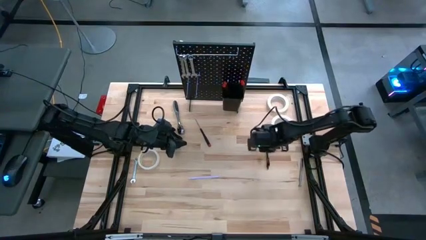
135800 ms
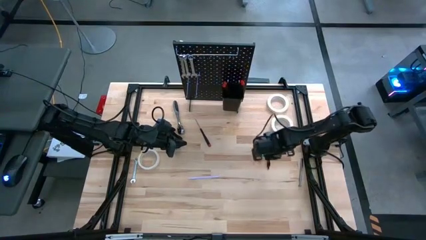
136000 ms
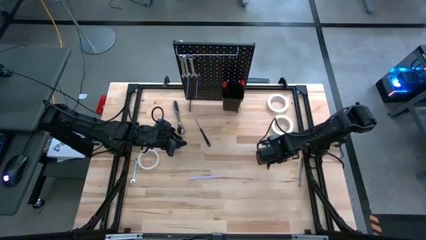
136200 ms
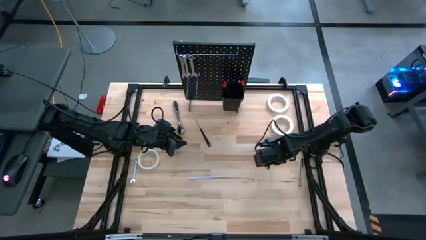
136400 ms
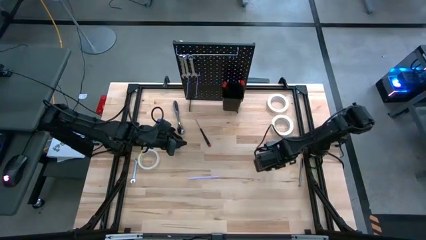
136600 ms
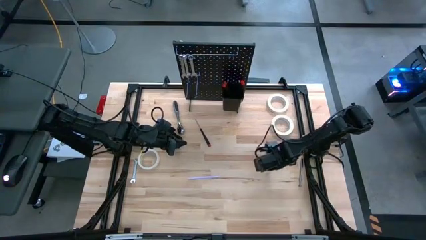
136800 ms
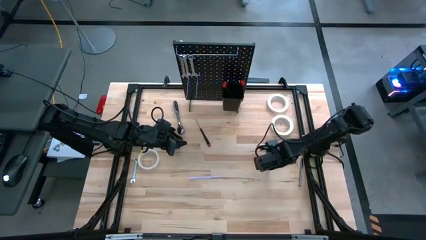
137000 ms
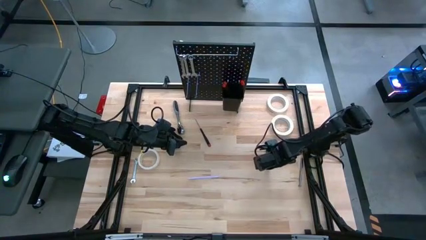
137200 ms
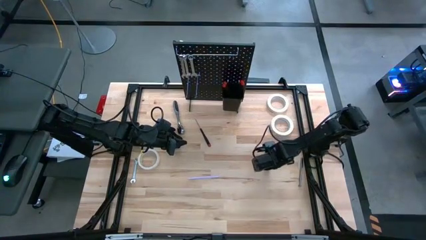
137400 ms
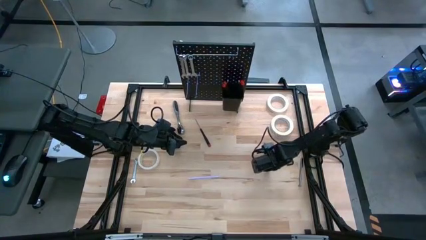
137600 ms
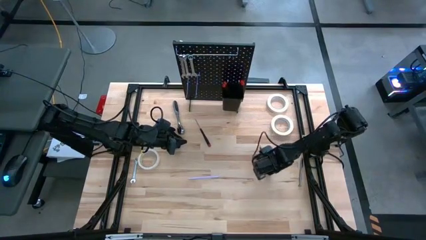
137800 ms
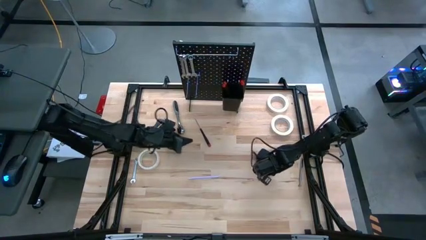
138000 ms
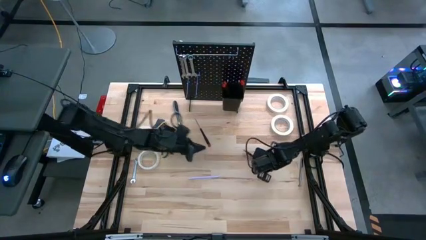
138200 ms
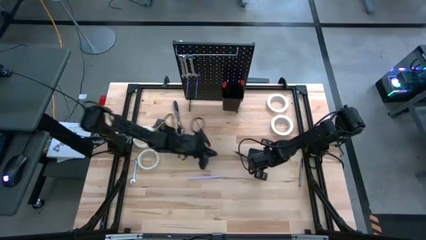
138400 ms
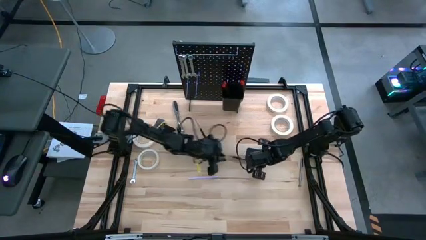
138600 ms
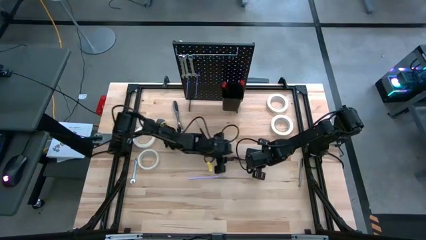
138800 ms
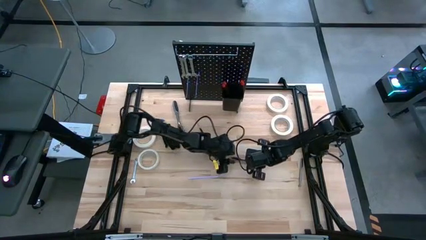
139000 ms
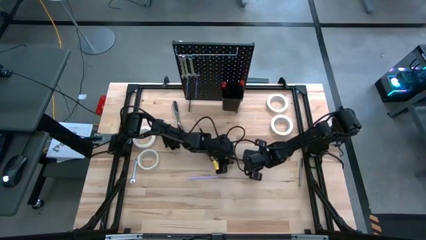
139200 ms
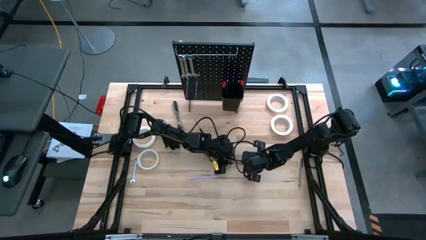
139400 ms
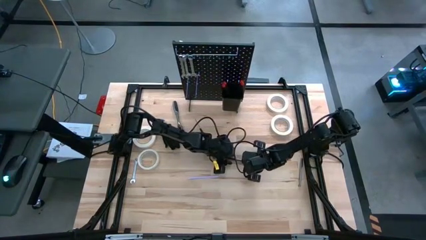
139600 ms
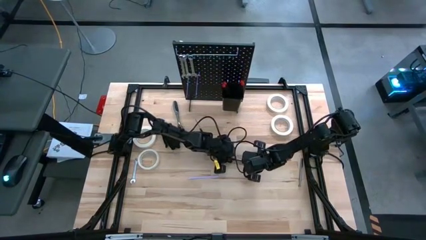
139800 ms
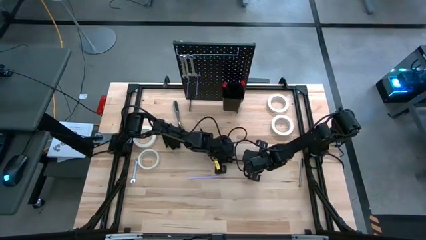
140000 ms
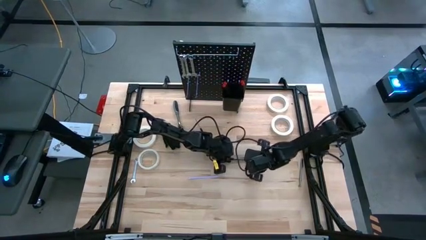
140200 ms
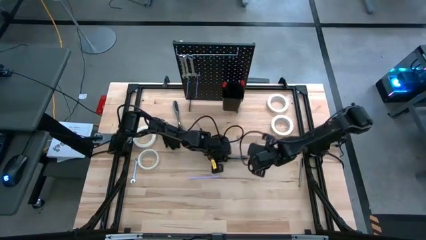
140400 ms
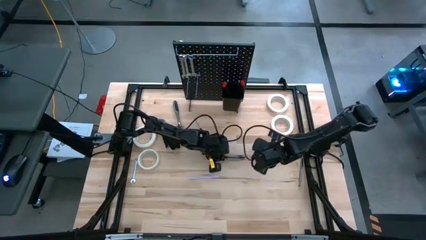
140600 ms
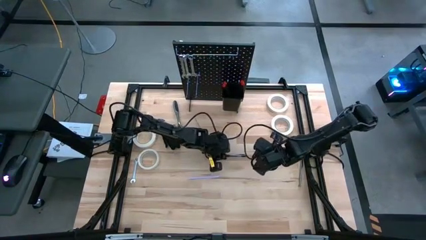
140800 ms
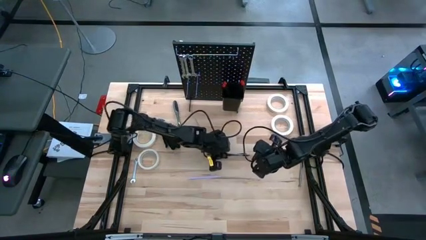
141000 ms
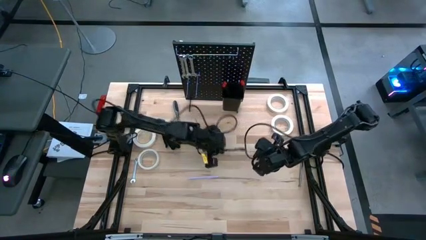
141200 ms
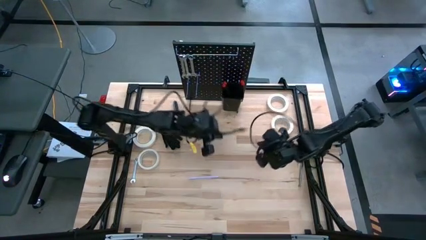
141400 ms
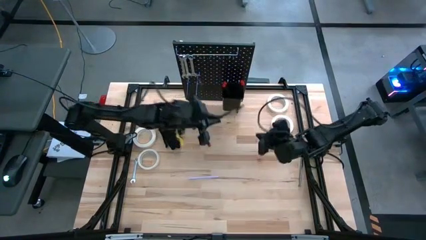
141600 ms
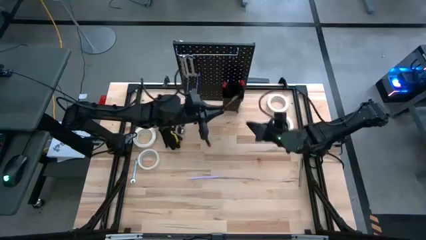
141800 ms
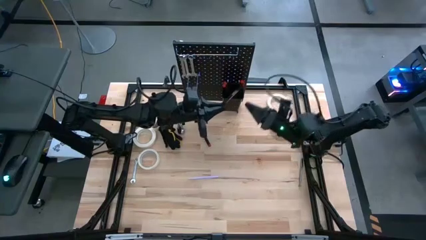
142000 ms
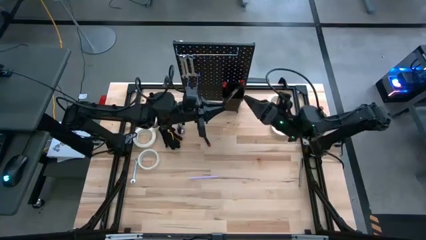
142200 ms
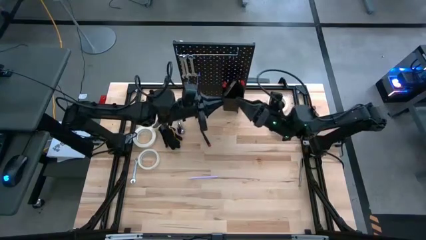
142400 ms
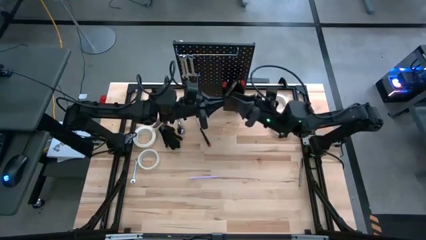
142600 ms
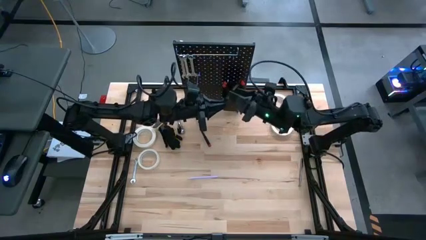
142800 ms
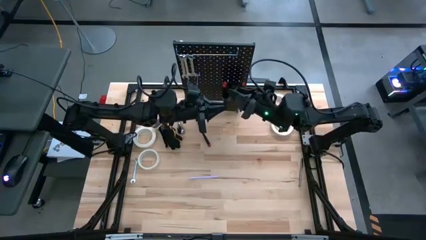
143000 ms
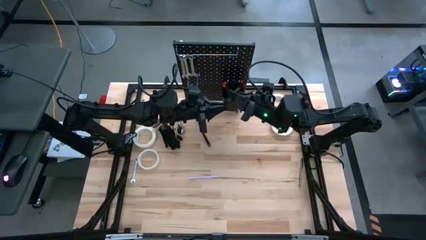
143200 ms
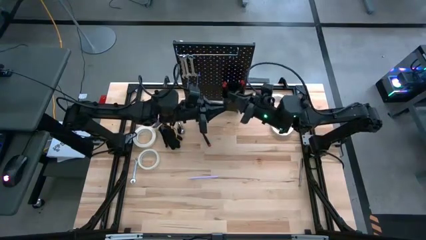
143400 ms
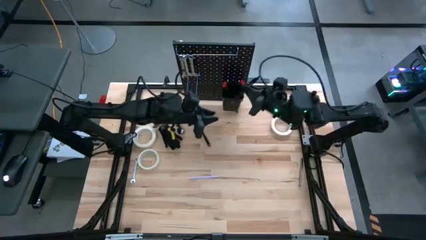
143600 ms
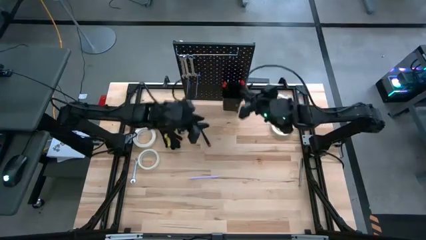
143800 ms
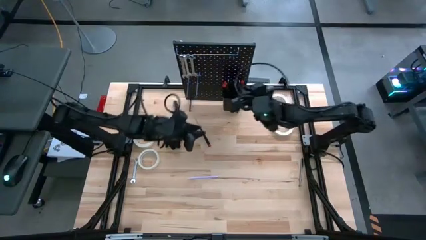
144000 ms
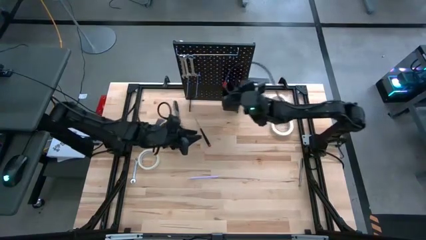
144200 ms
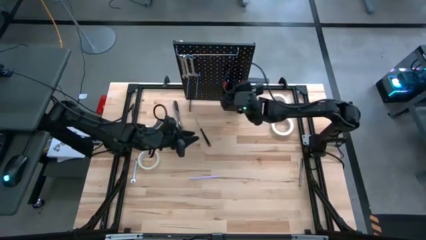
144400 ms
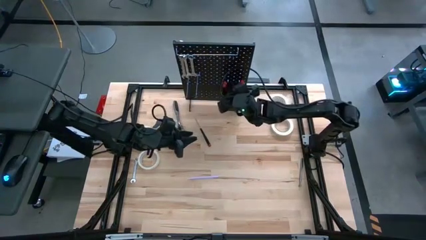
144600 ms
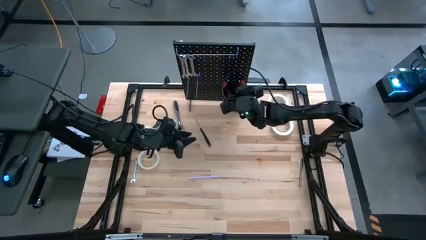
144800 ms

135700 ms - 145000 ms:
Task: Hang tools onto peg board
Put the black pen into the black bin on the pegboard

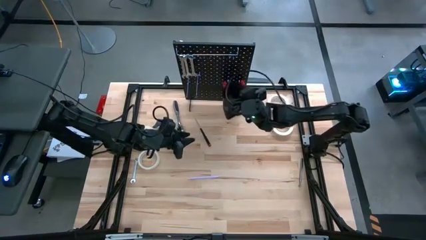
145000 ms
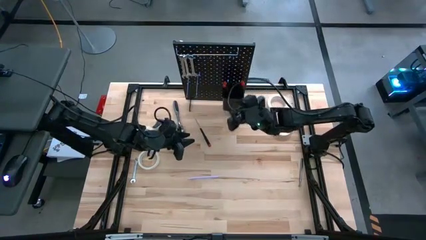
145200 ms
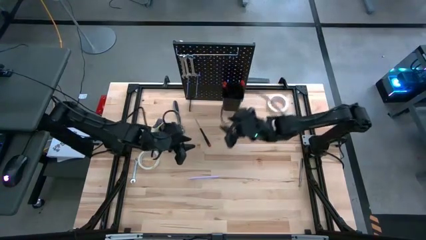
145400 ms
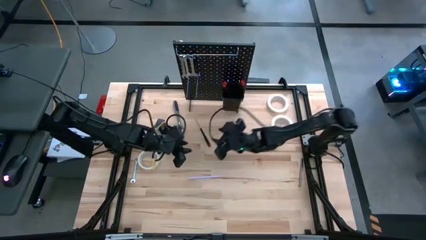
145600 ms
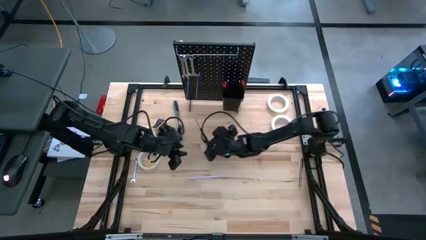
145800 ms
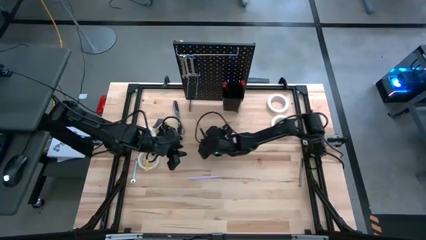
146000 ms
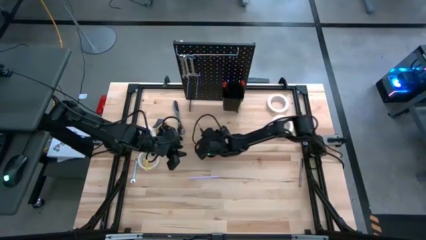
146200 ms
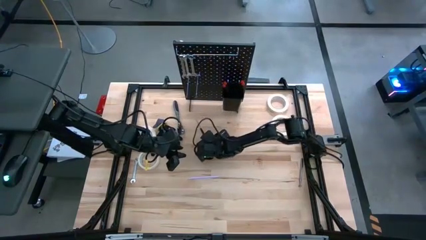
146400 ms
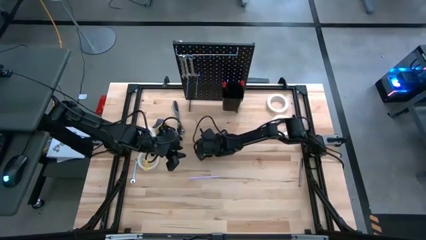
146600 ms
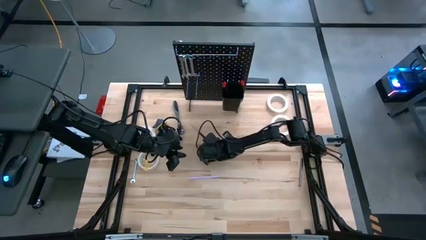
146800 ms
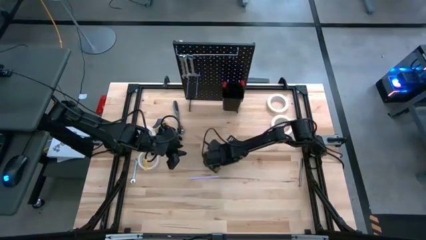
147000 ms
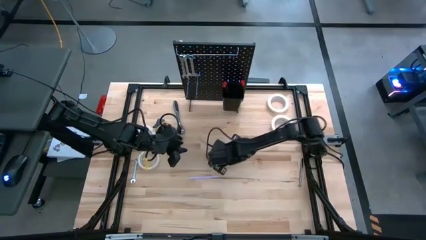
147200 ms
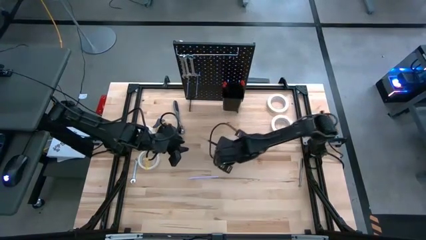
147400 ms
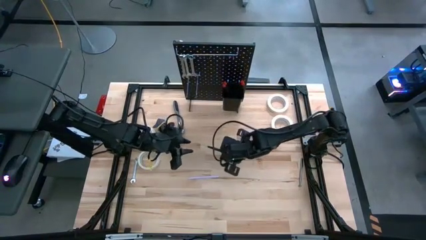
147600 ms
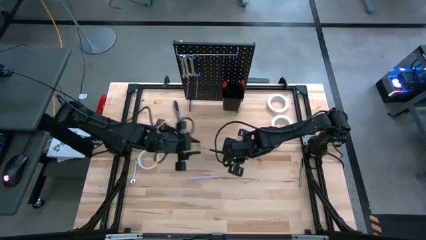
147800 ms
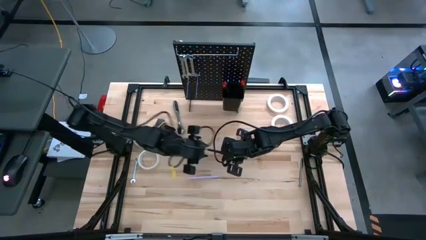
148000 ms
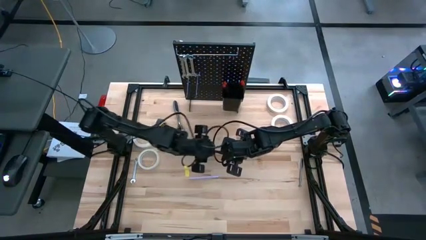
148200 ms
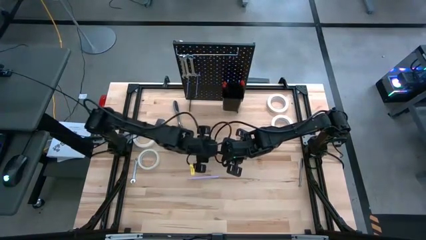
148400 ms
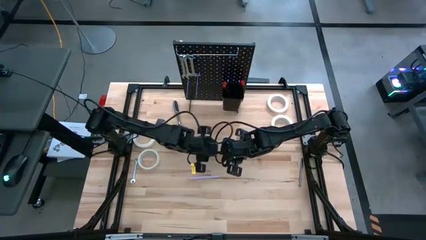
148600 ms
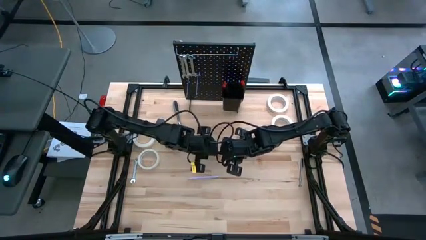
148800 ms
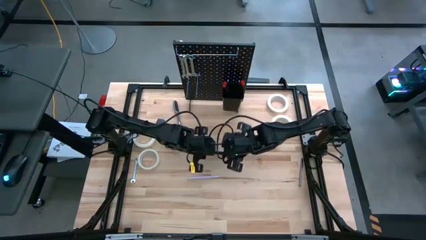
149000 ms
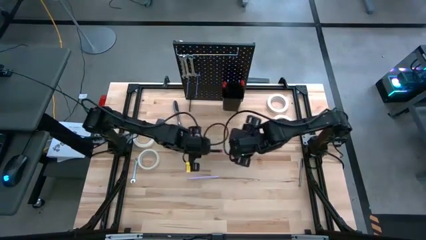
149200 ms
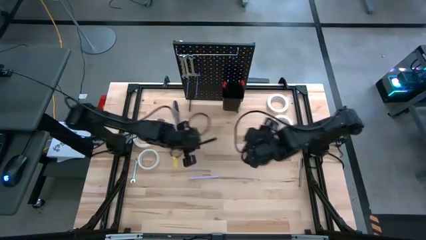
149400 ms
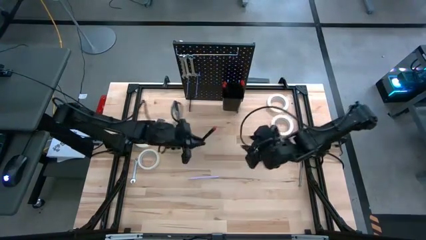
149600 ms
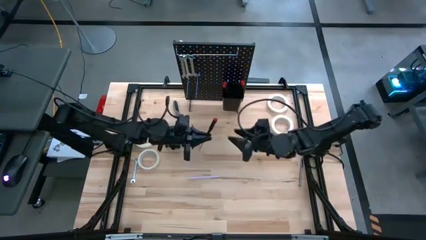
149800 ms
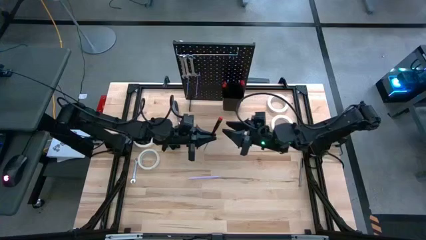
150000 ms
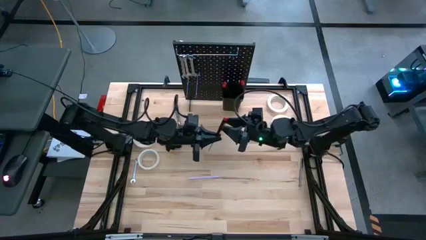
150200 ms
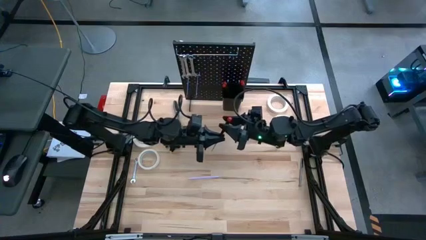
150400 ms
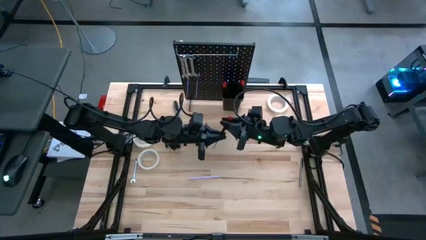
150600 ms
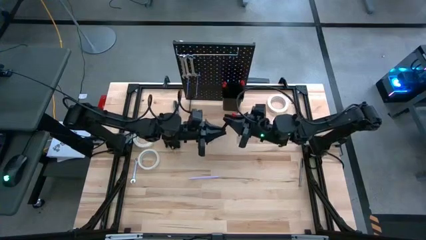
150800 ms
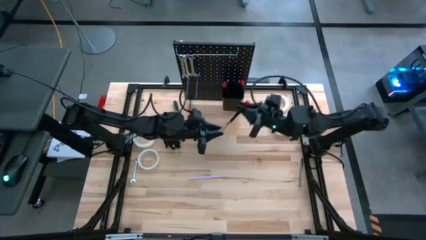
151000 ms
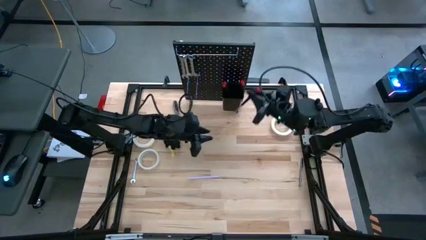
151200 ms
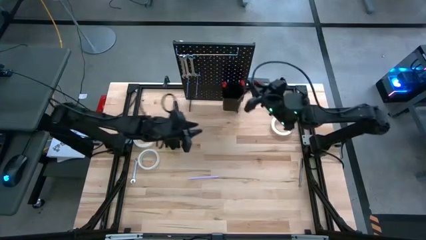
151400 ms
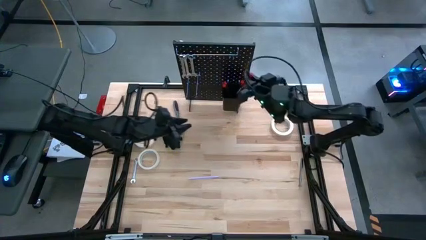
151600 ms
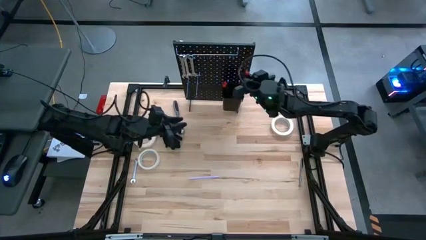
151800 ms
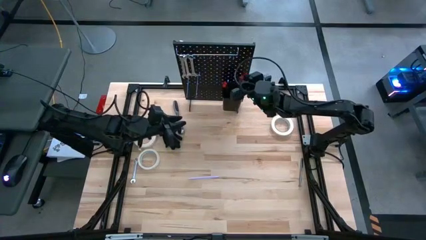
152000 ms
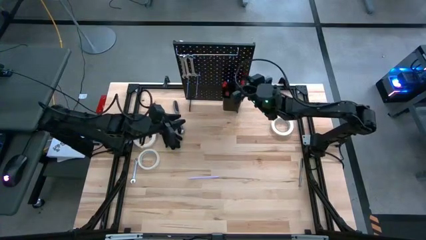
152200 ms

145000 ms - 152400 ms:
Put the nut driver into the black bin on the pegboard
